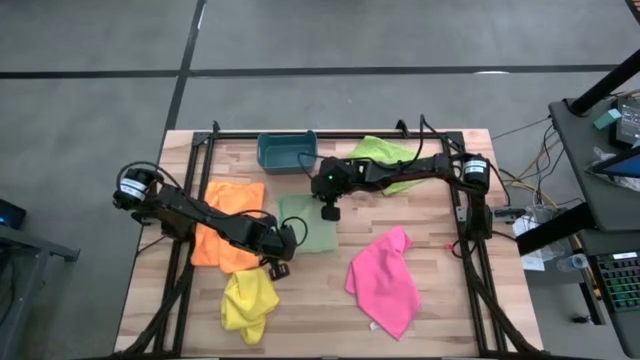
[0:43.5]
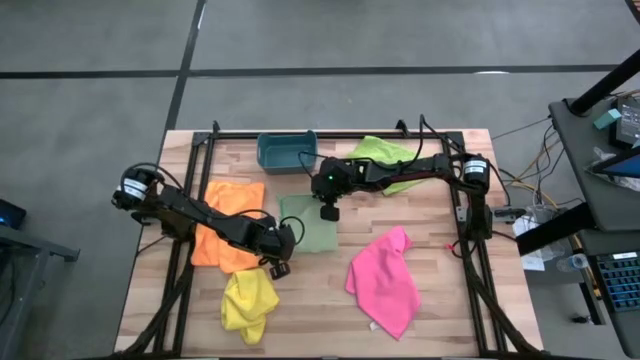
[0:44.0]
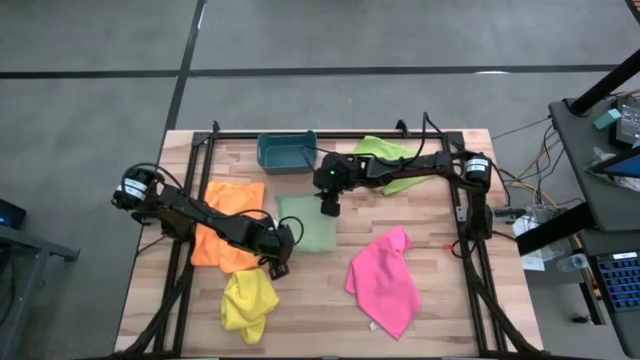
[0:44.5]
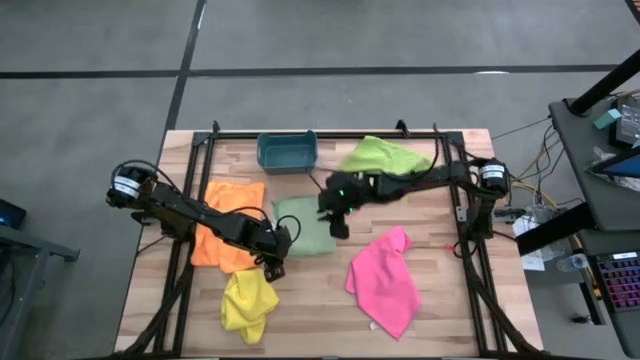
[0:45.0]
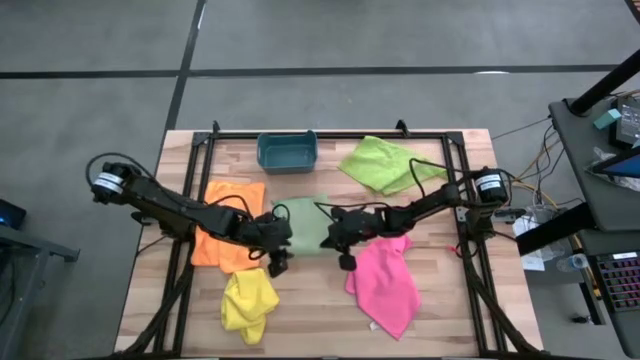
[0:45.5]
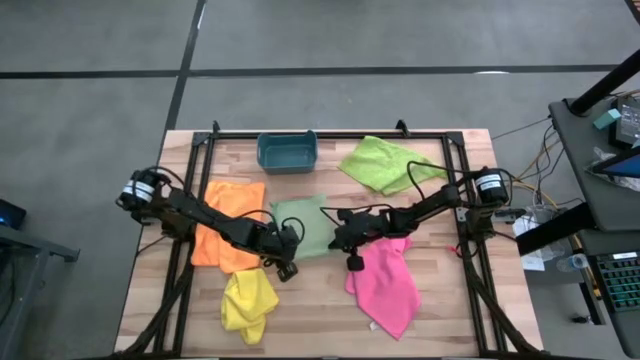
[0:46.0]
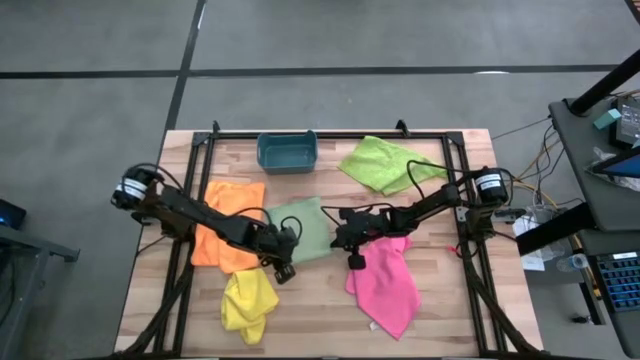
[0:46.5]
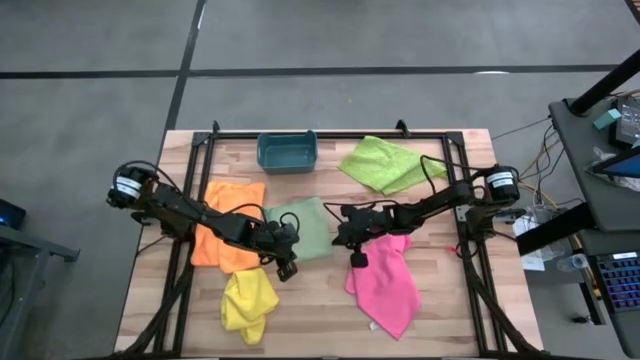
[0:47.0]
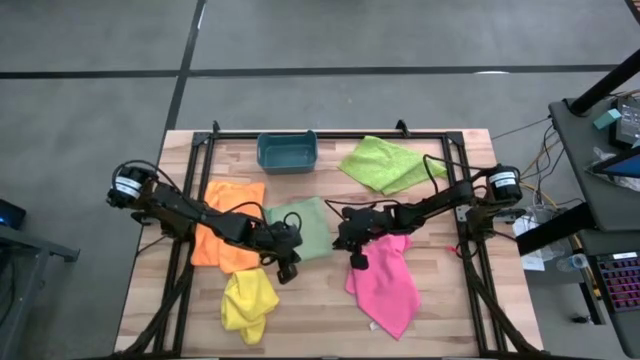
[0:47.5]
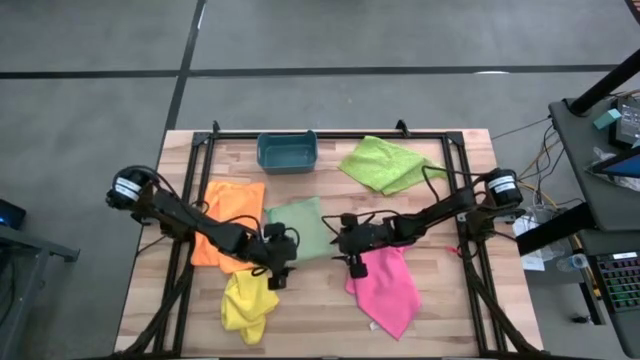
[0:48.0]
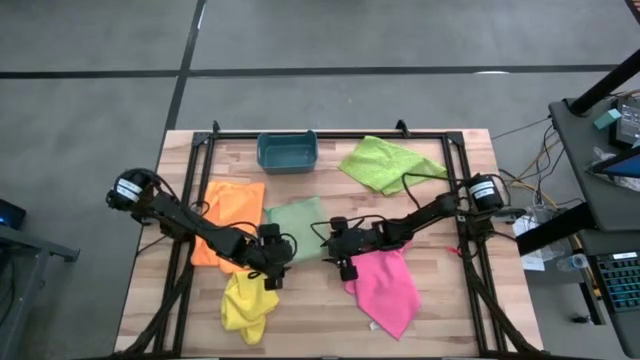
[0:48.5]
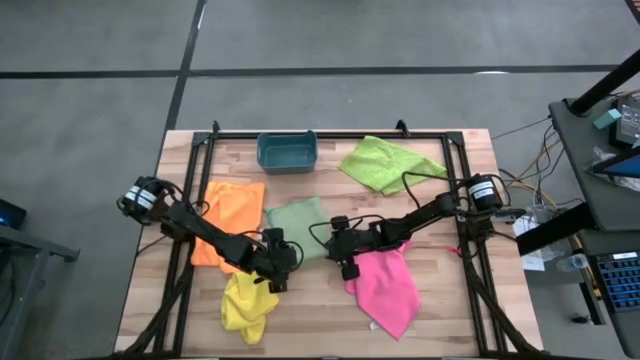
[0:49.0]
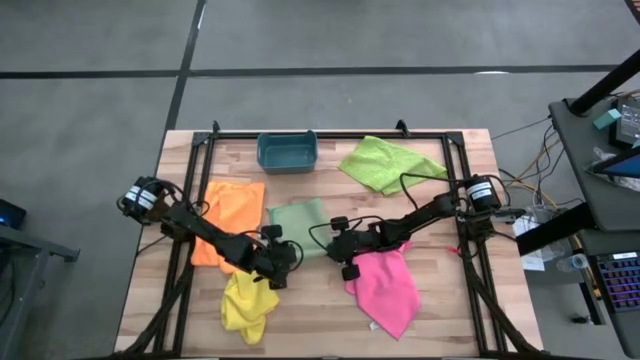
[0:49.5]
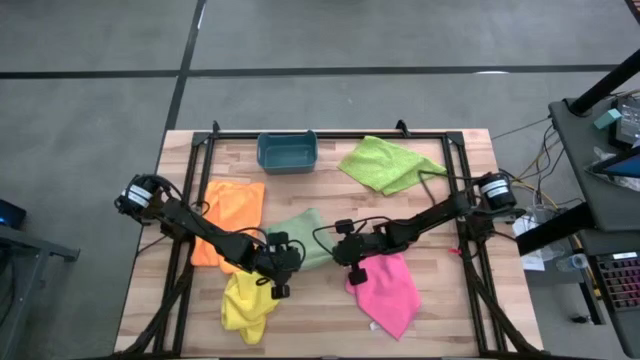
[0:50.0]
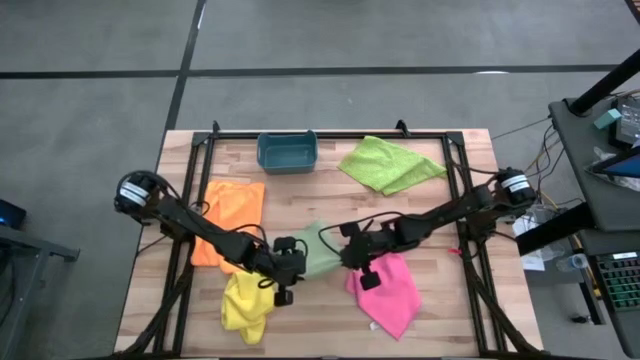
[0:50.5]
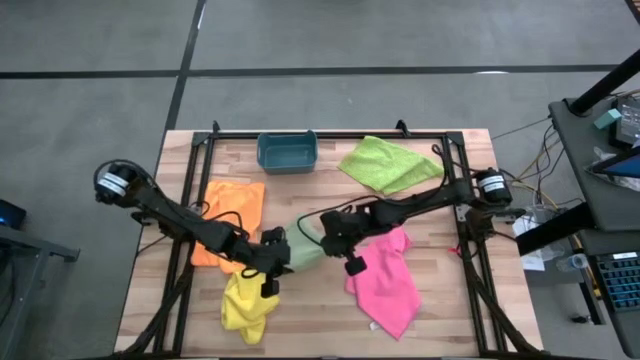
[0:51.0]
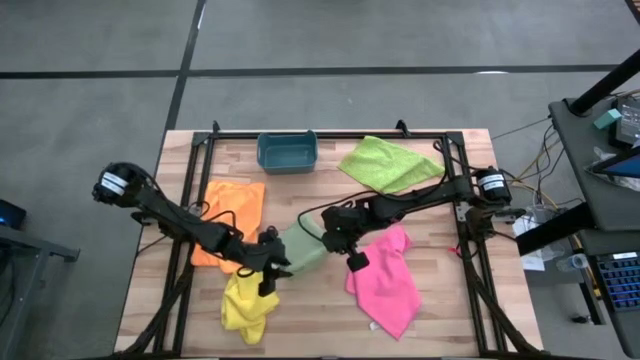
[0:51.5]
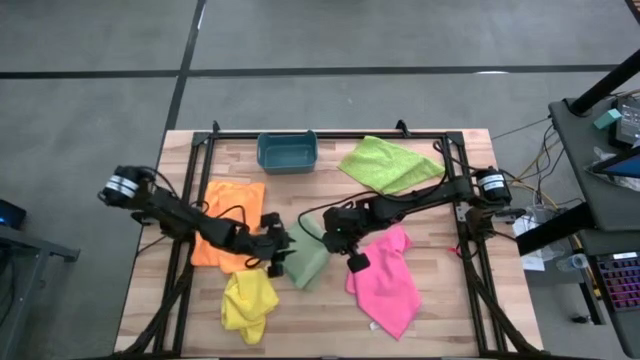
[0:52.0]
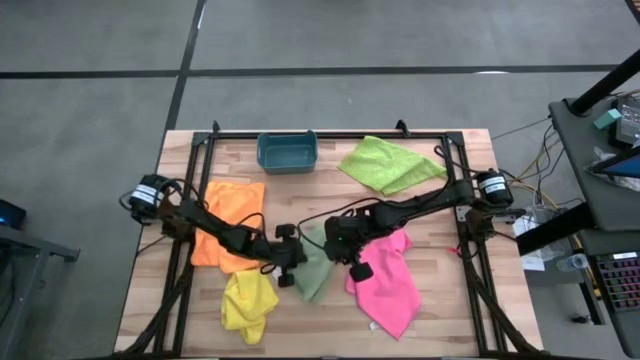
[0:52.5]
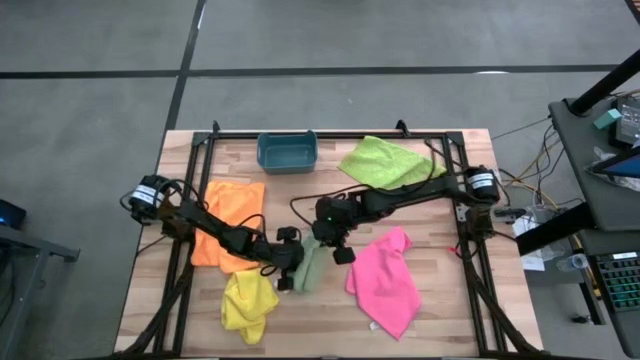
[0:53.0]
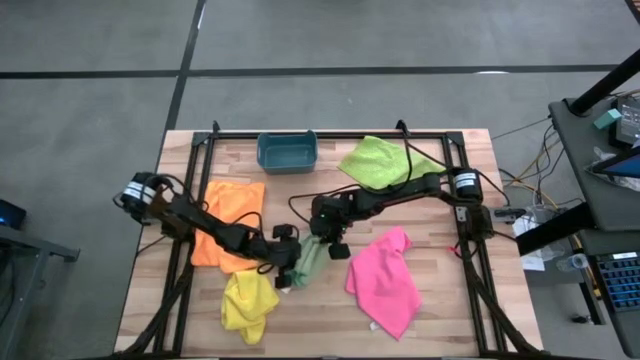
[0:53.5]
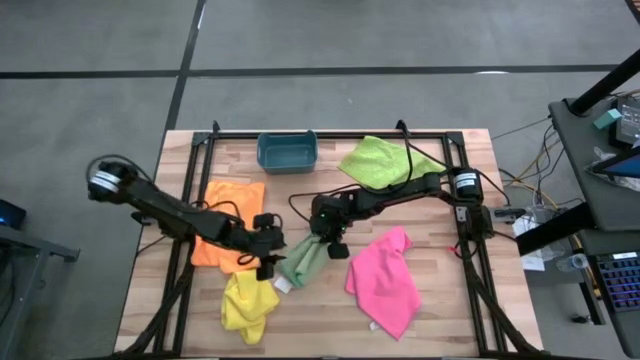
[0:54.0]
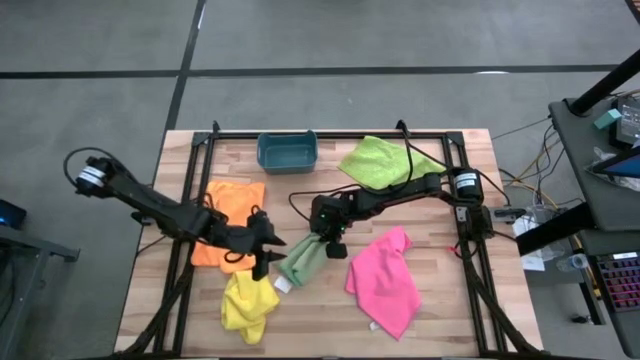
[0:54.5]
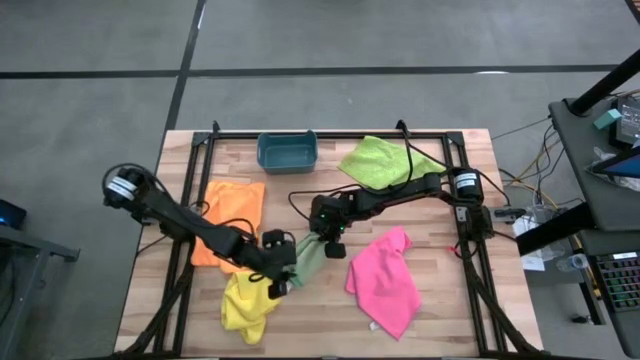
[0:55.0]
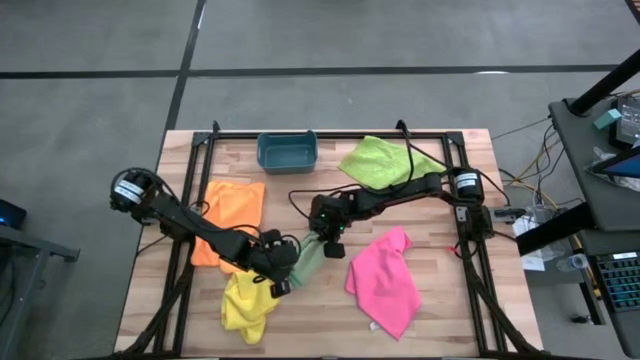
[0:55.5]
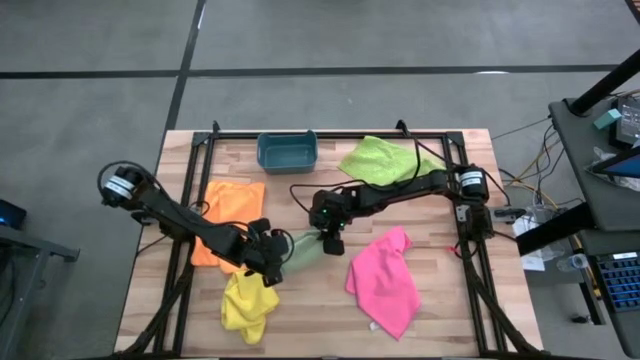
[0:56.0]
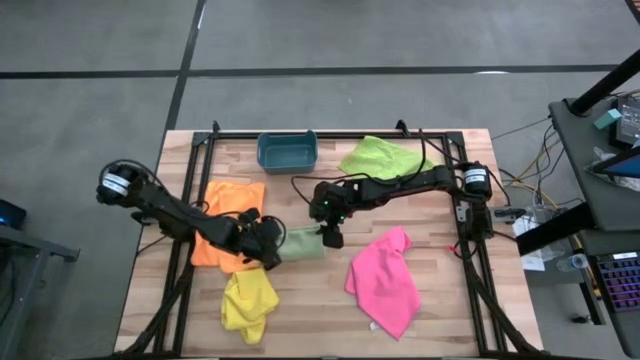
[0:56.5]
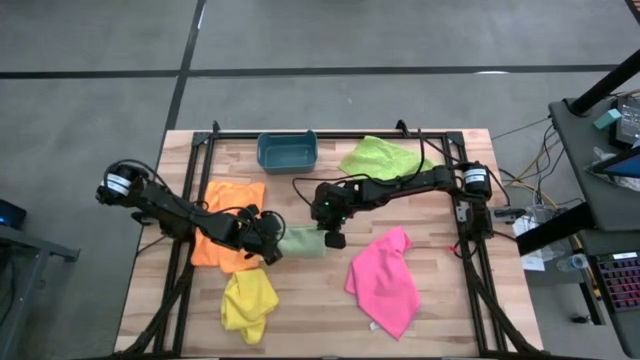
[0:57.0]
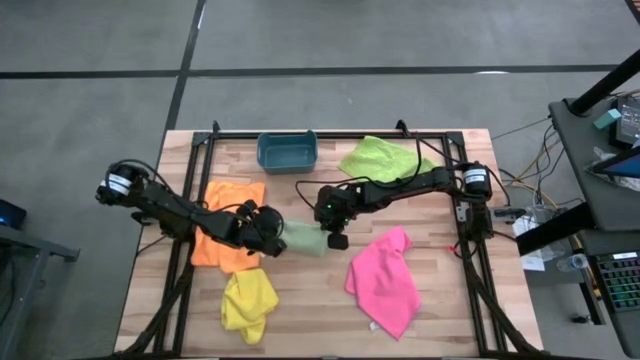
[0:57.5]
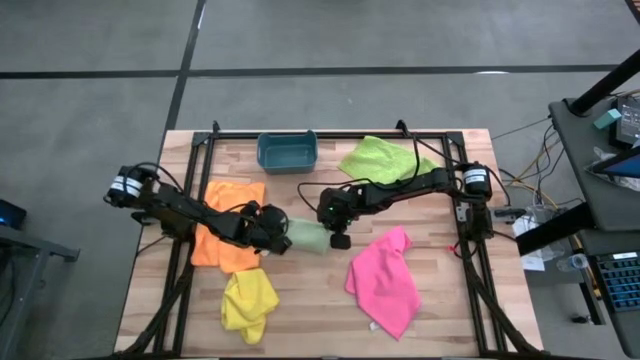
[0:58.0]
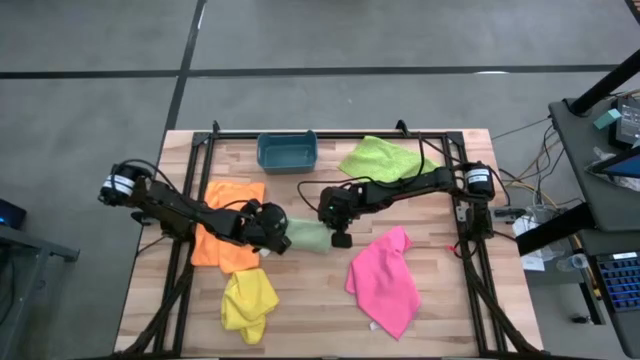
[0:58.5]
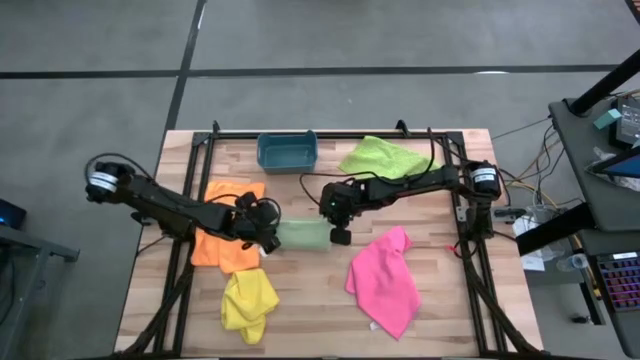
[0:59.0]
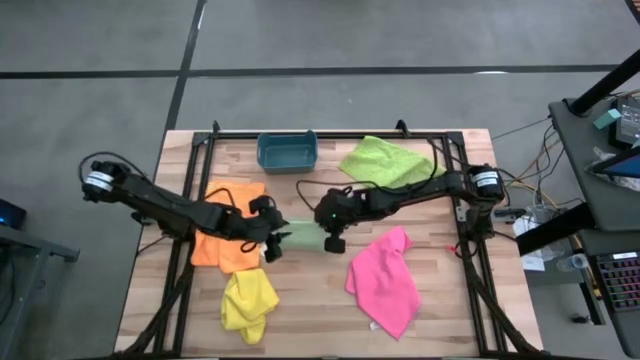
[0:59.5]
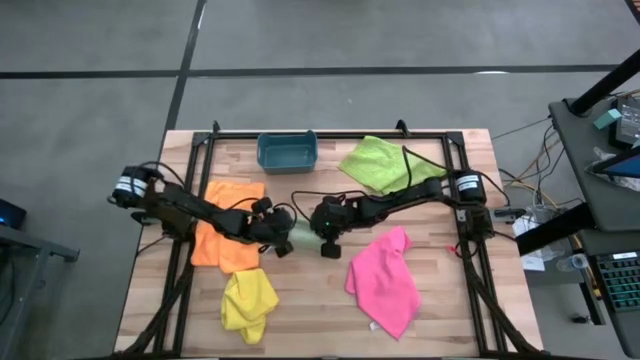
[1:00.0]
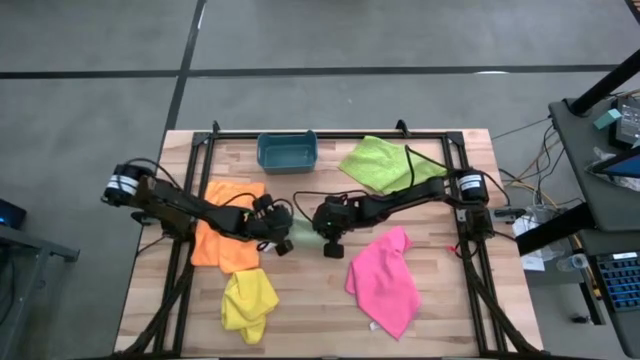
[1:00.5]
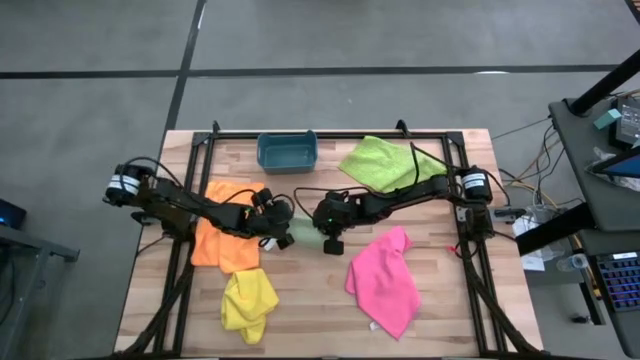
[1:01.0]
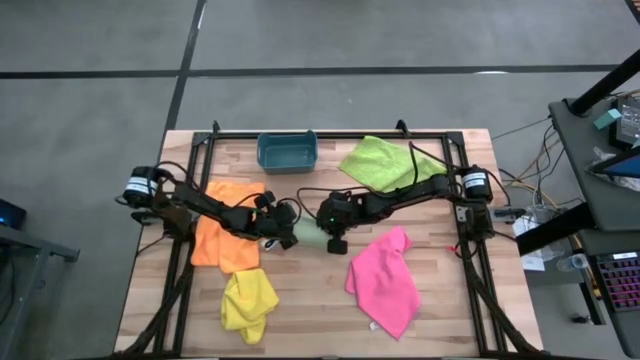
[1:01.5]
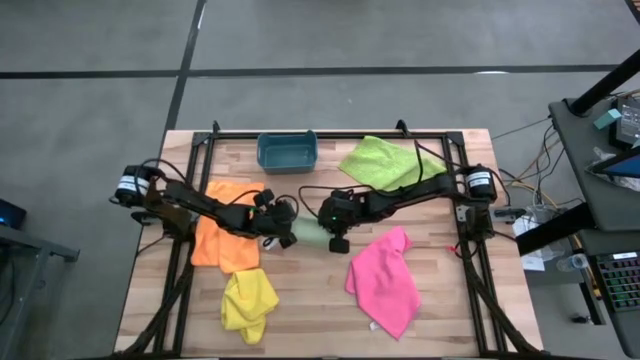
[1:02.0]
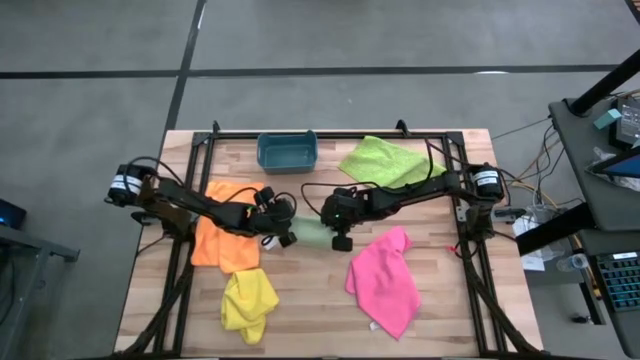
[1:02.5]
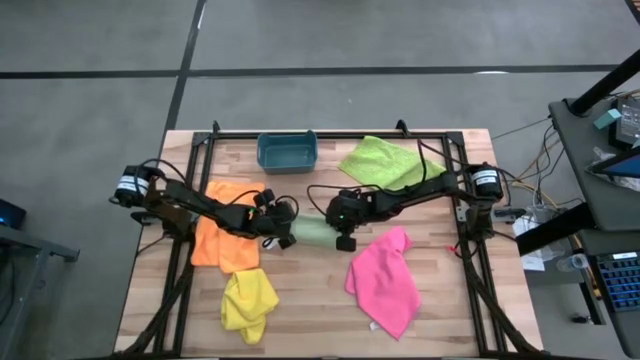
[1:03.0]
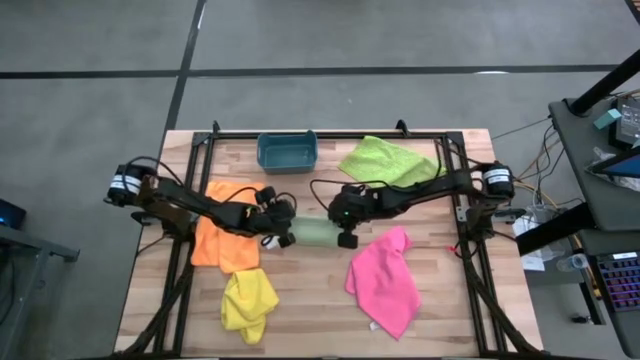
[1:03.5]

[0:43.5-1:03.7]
Task: Fold microfiber towels
Fold the blue towel
